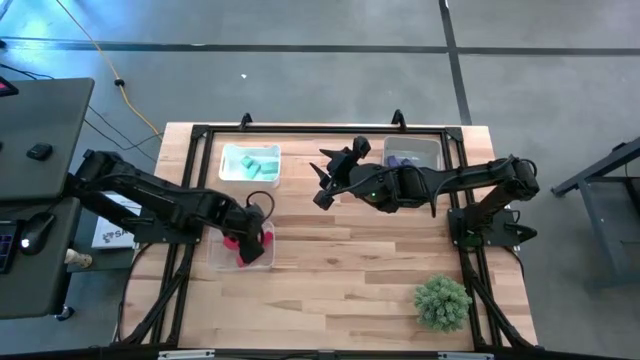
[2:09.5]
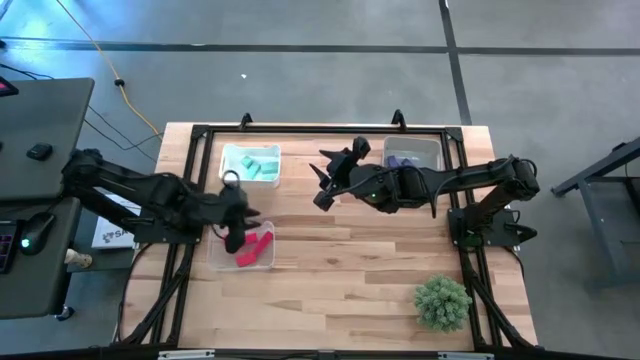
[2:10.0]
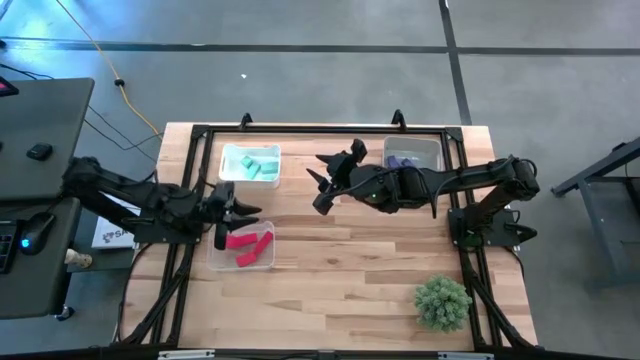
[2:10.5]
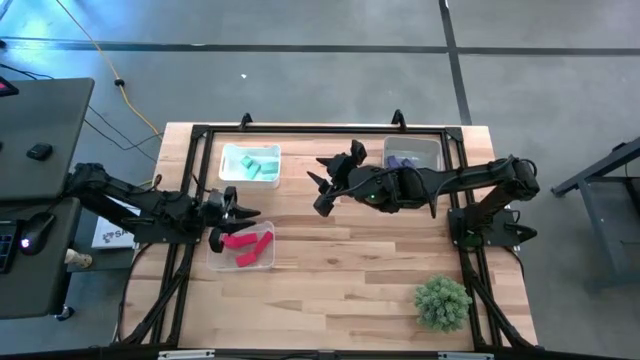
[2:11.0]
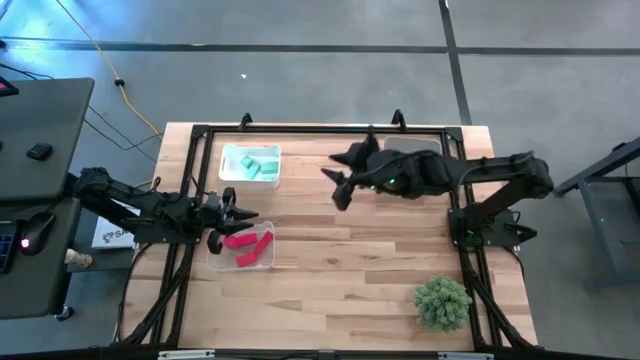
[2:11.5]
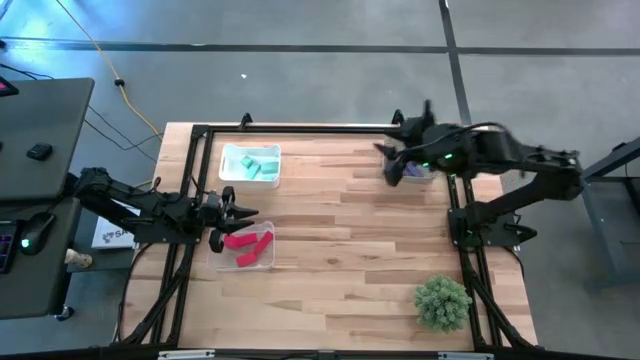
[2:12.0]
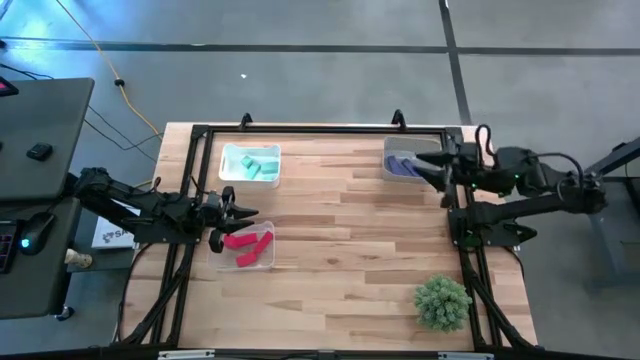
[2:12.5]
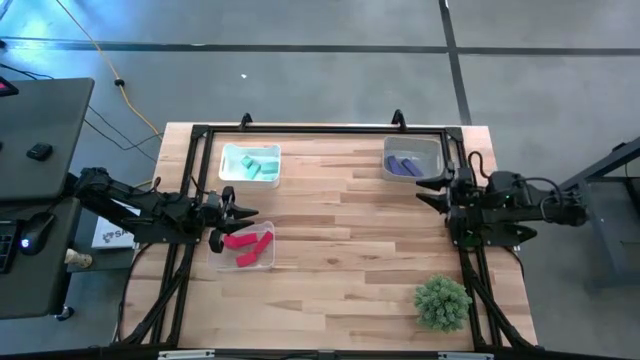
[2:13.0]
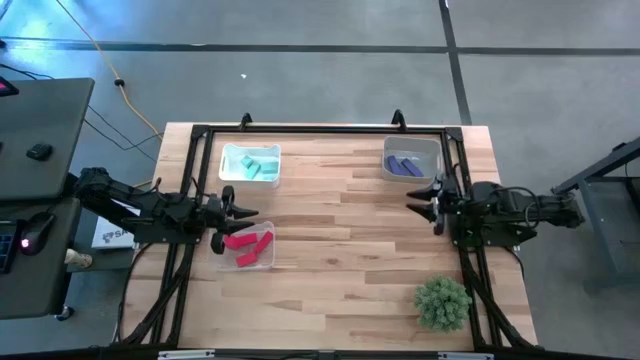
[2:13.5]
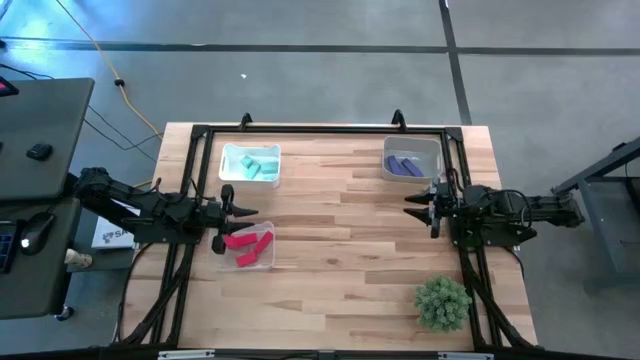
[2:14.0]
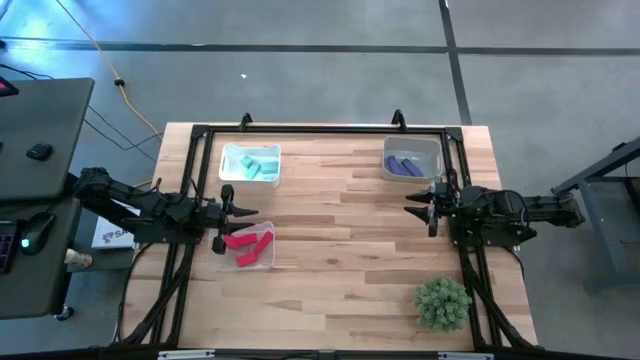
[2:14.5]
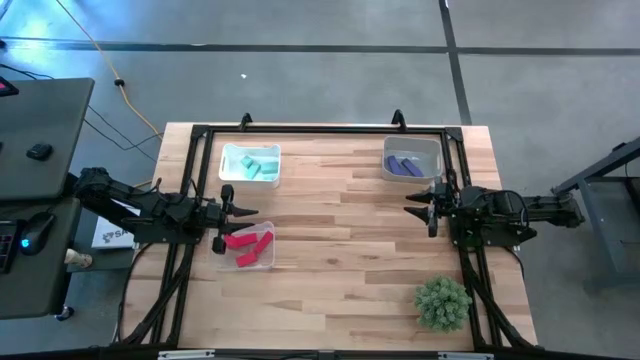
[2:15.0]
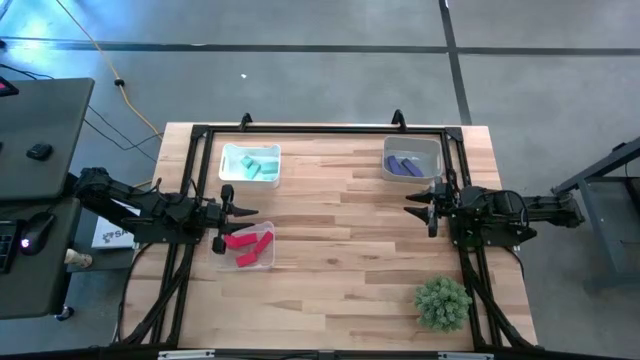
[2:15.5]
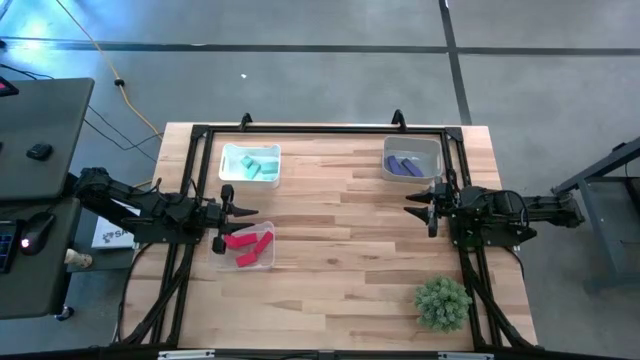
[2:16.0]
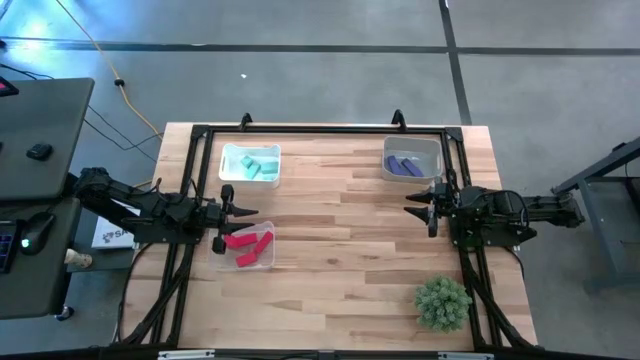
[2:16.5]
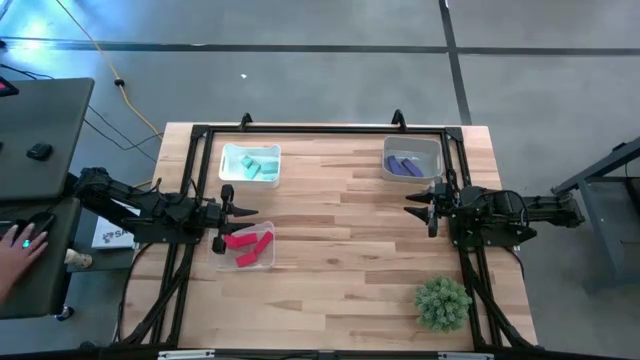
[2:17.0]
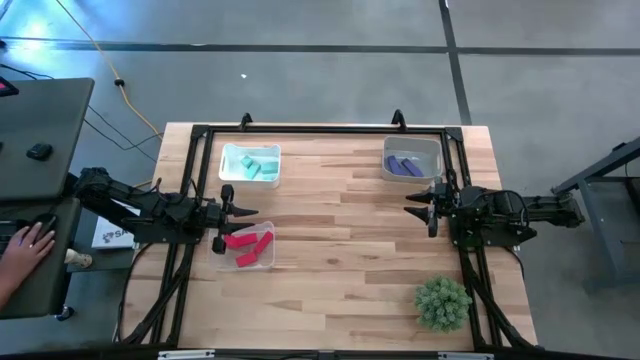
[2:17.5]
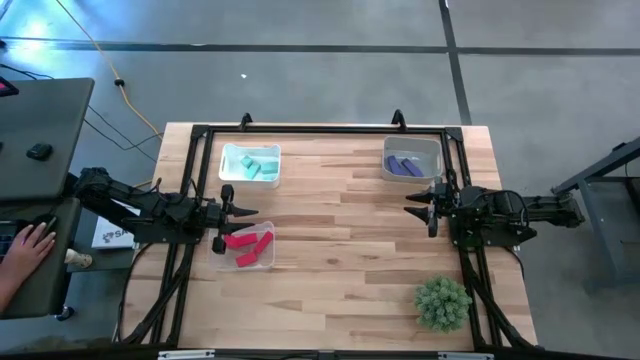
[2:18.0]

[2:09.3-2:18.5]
Task: Sort & place blocks by color
Return to Home Position

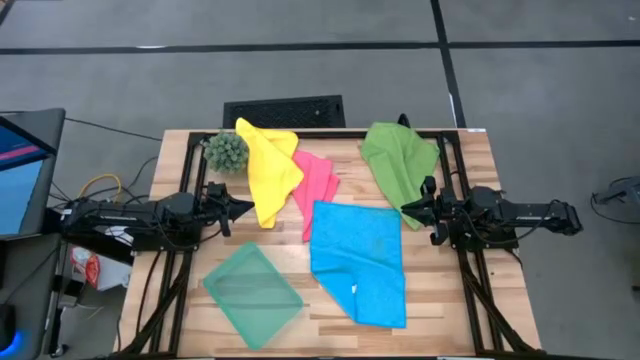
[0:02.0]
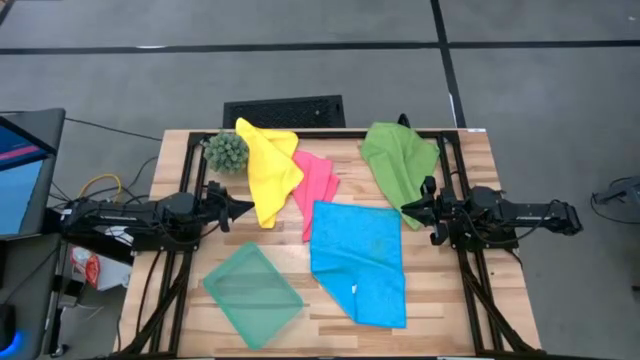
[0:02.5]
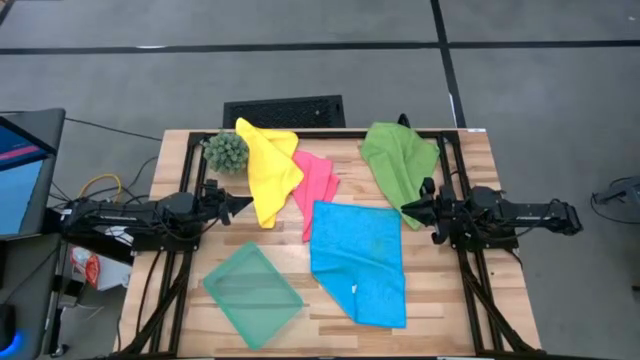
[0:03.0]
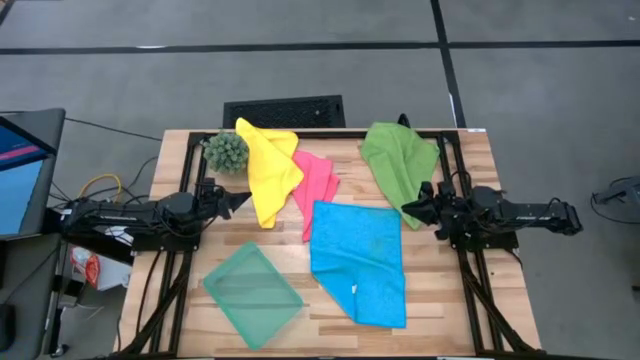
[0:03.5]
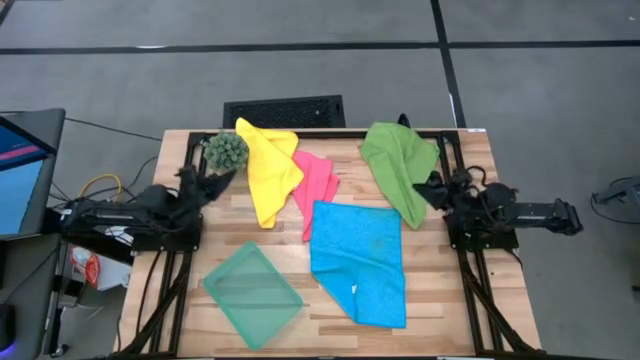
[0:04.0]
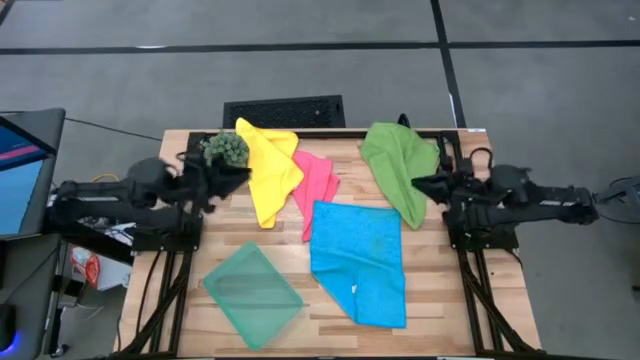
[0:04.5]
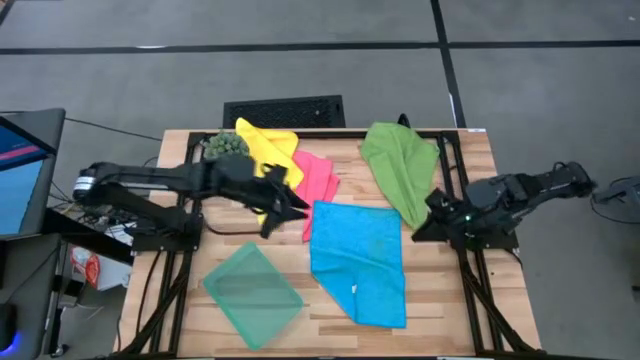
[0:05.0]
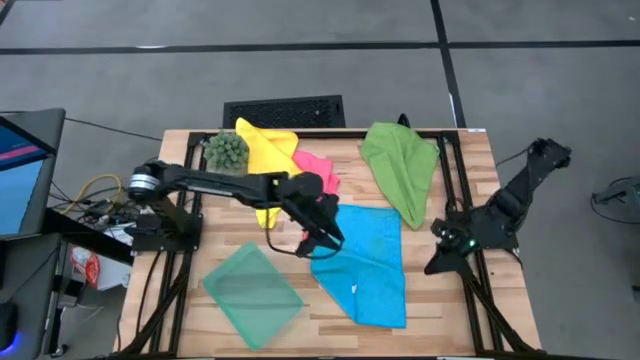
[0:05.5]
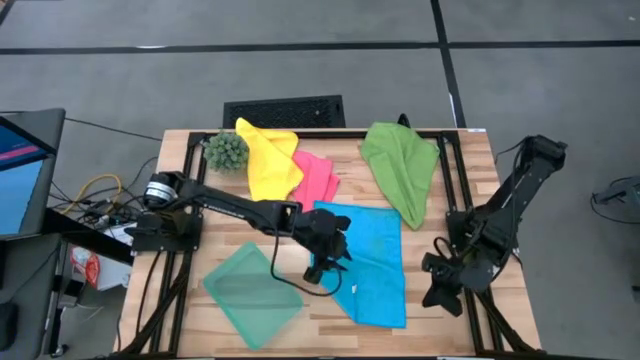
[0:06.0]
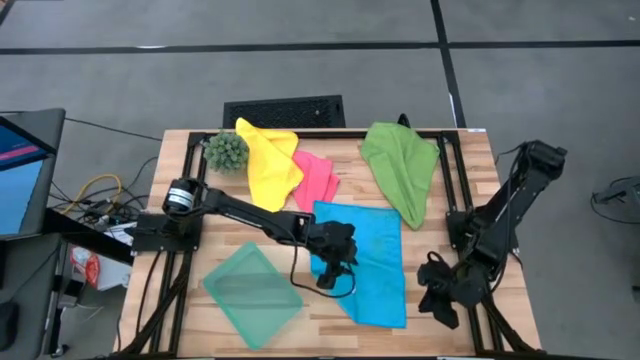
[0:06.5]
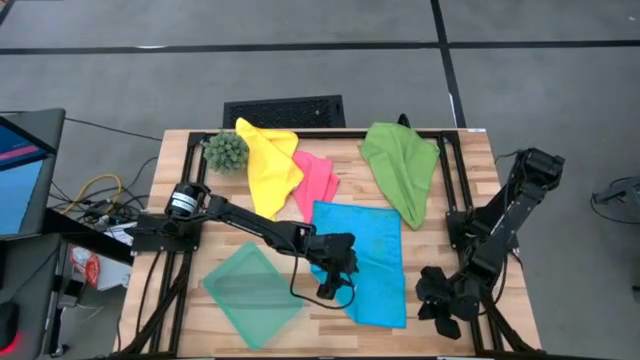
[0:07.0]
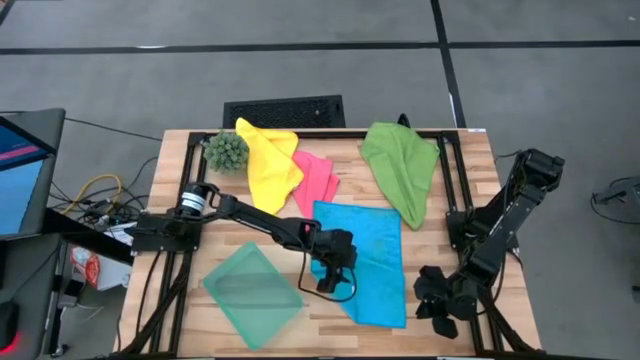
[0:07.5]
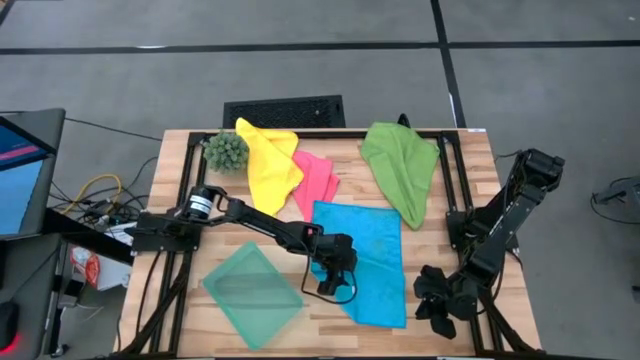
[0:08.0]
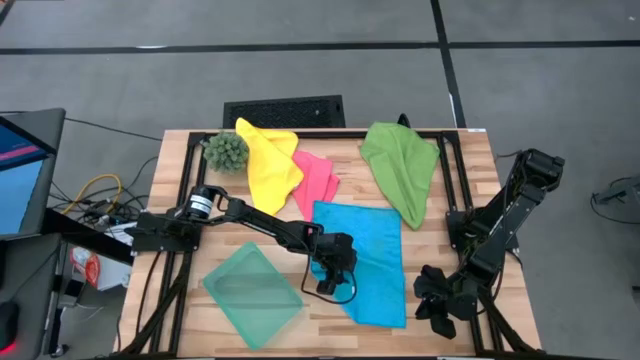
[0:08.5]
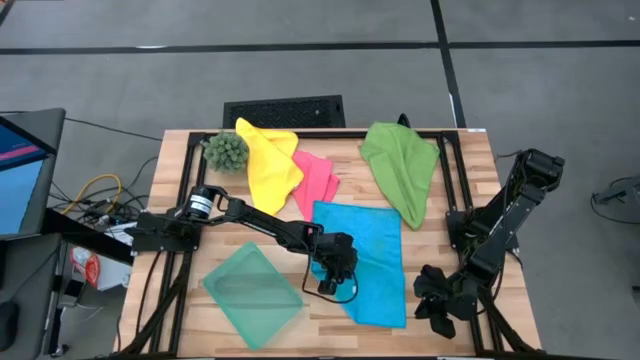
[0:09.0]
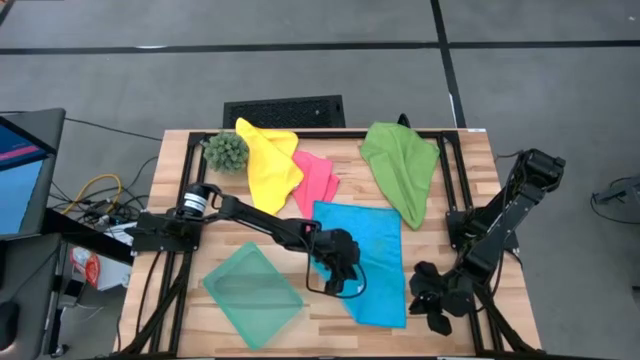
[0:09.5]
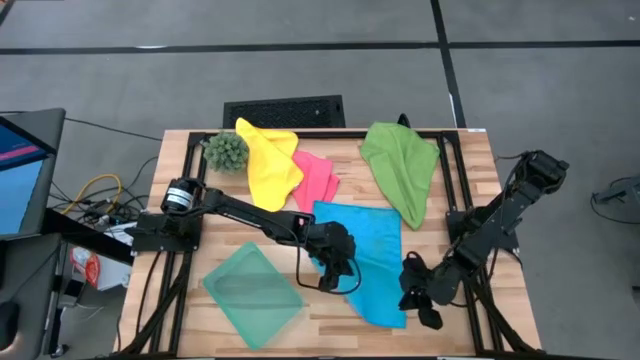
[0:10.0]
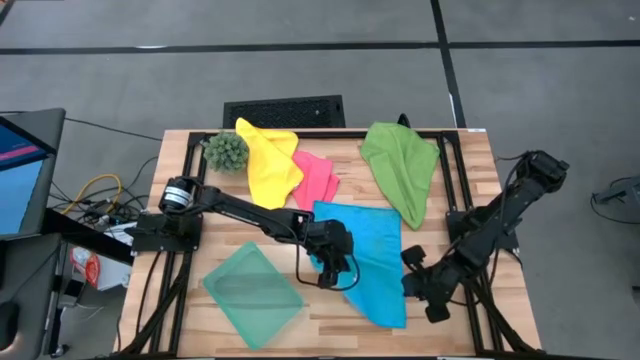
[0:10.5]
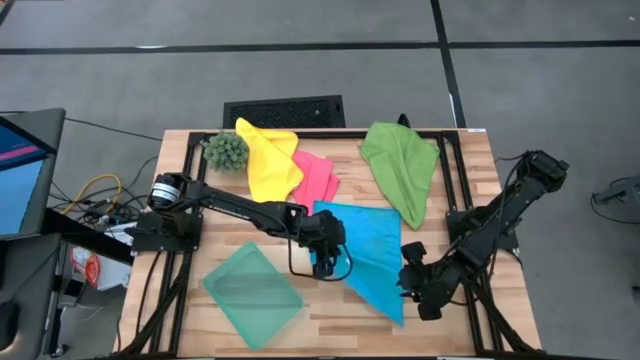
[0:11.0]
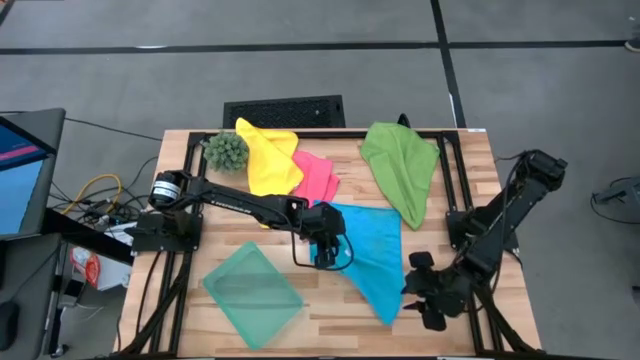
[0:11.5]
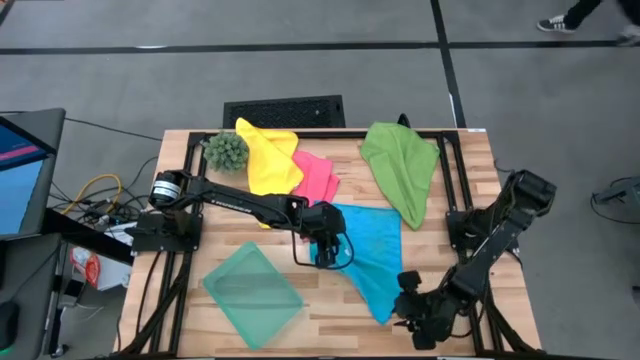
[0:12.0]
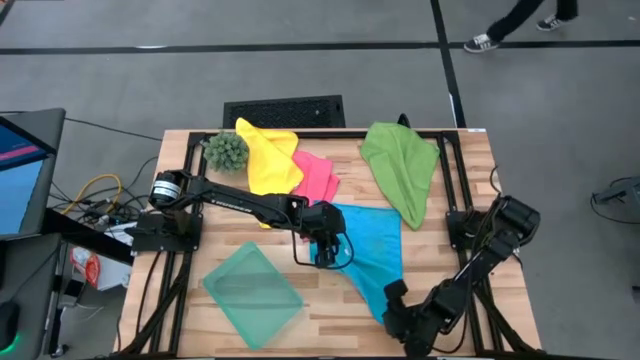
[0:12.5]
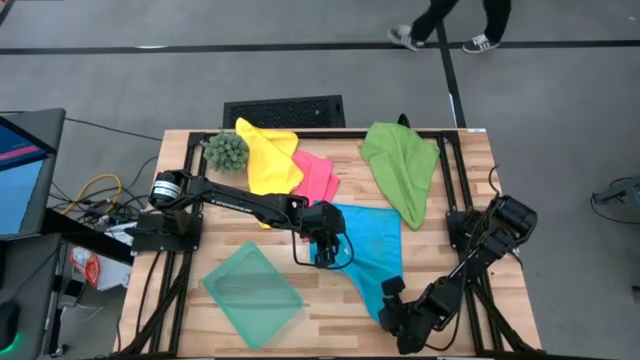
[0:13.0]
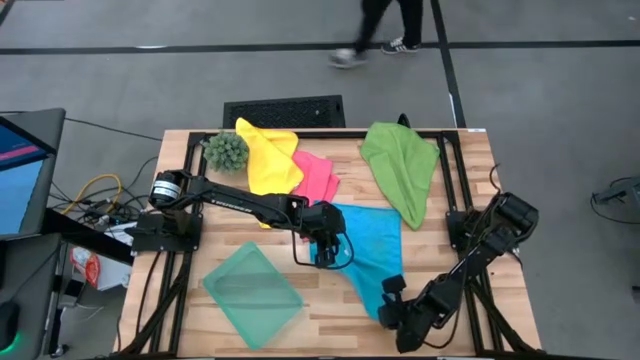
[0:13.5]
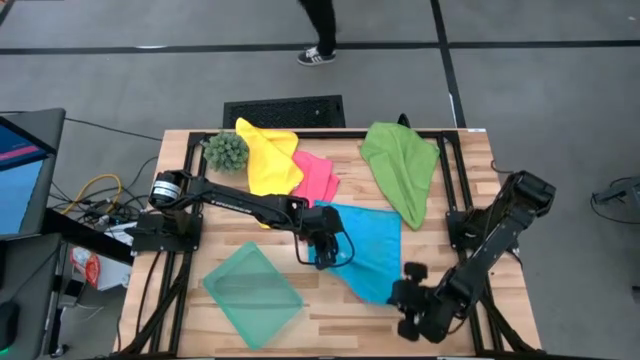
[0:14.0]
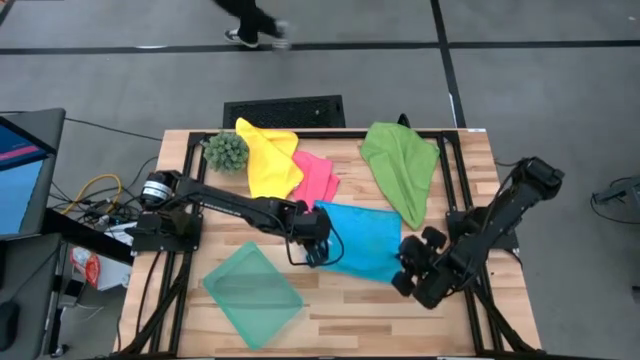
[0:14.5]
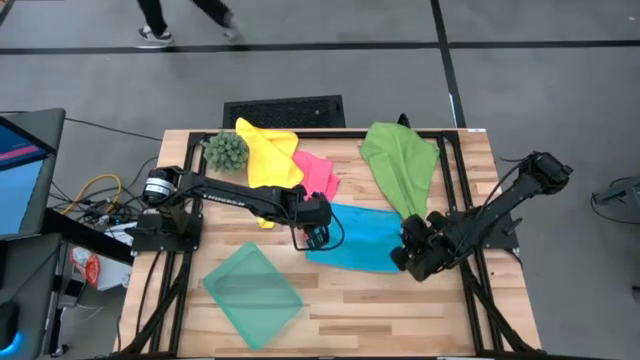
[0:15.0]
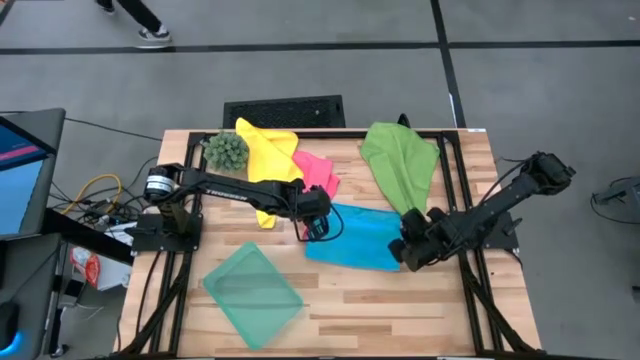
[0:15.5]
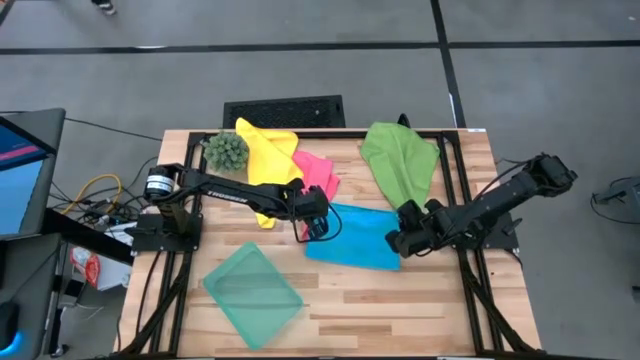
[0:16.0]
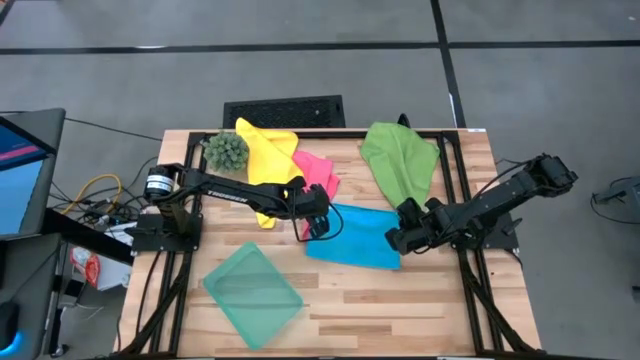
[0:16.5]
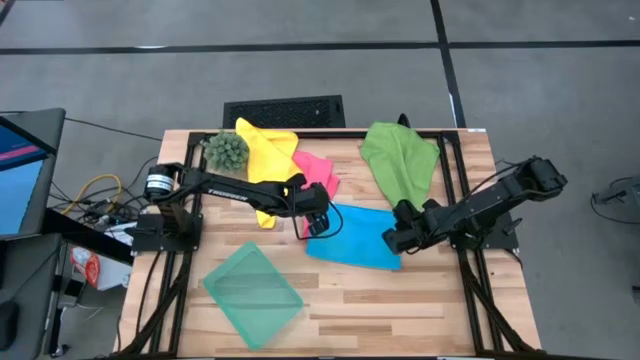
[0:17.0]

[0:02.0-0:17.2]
Task: Fold microfiber towels
Fold the blue microfiber towel
